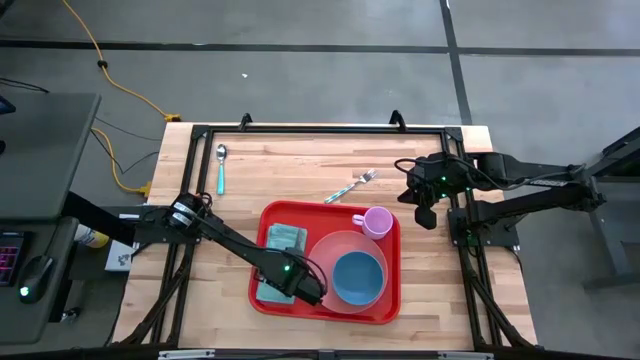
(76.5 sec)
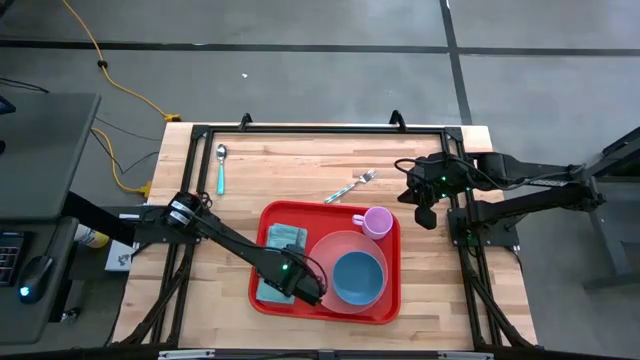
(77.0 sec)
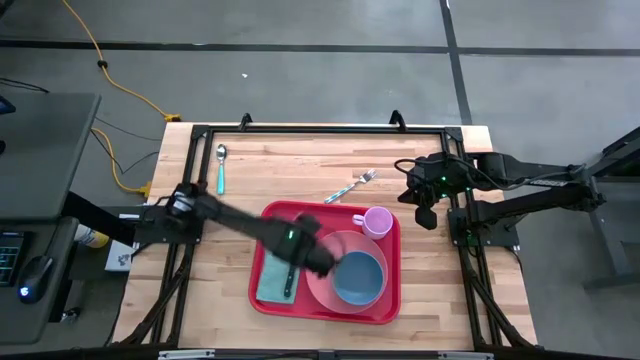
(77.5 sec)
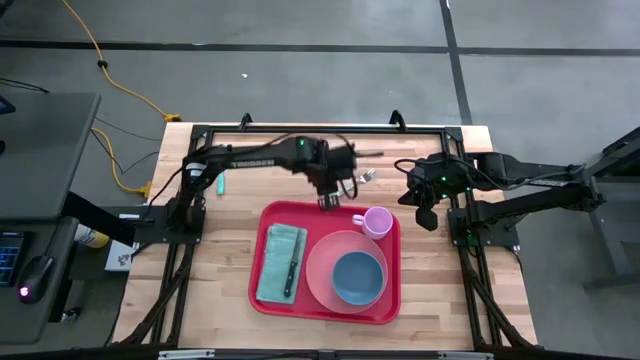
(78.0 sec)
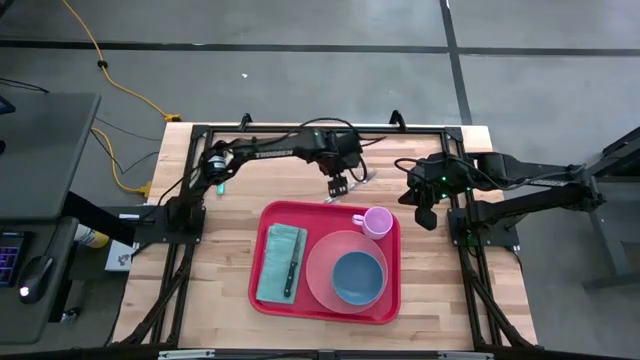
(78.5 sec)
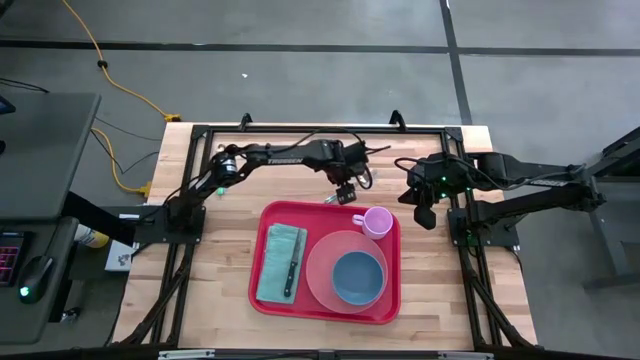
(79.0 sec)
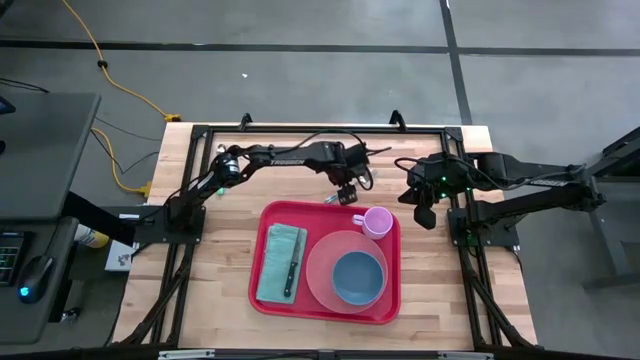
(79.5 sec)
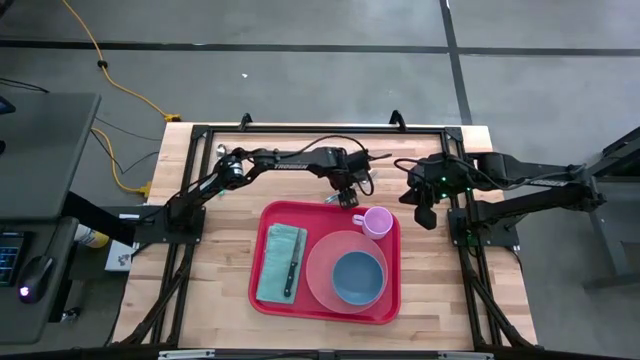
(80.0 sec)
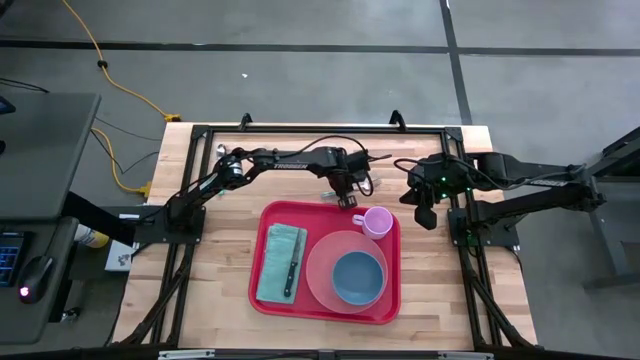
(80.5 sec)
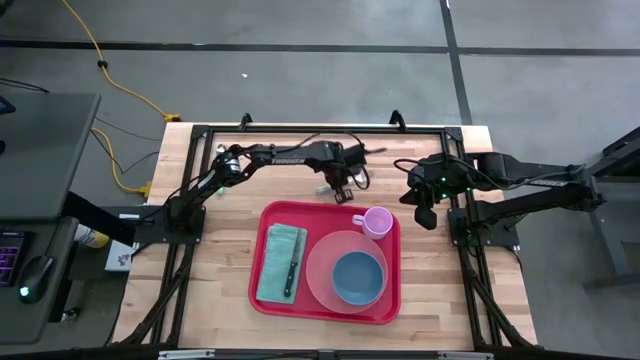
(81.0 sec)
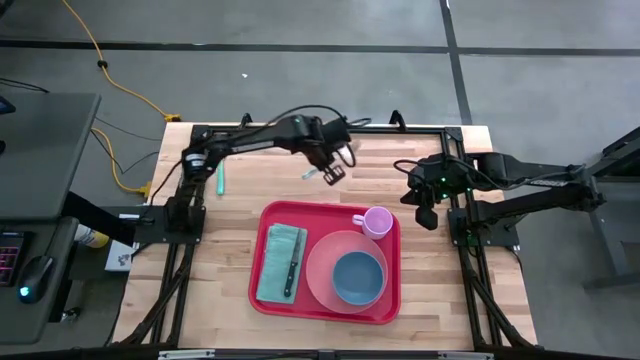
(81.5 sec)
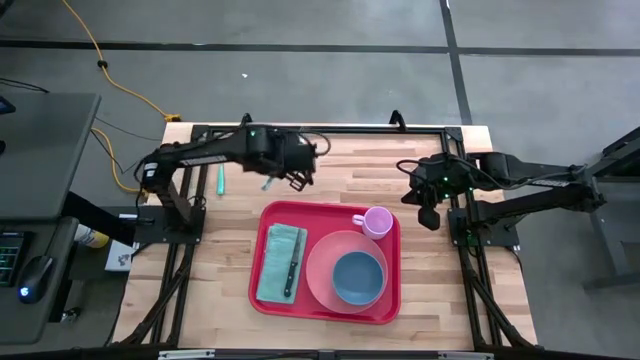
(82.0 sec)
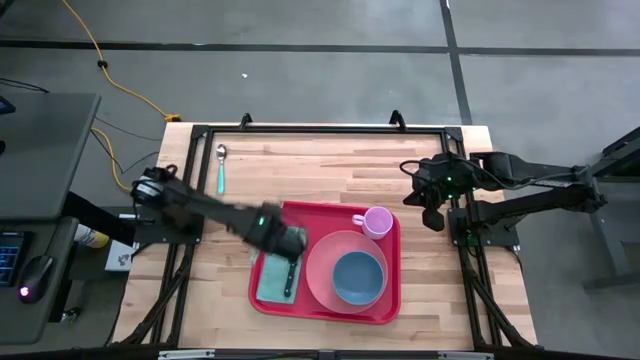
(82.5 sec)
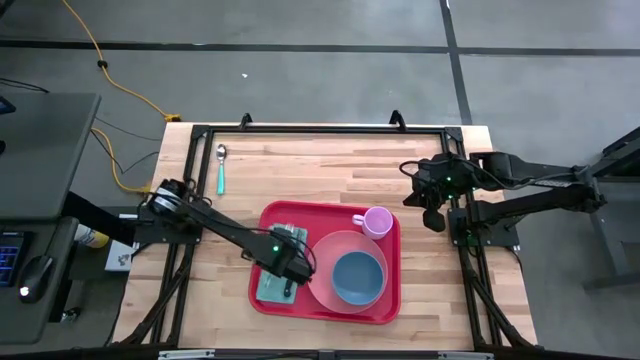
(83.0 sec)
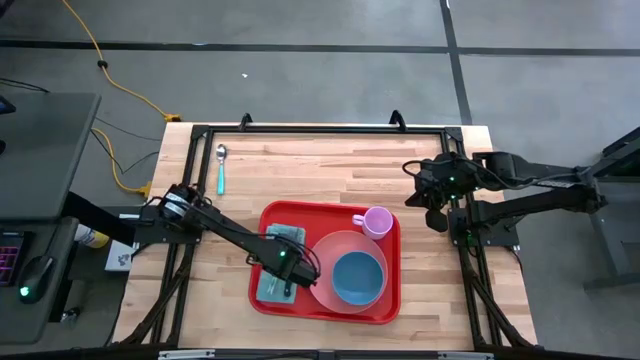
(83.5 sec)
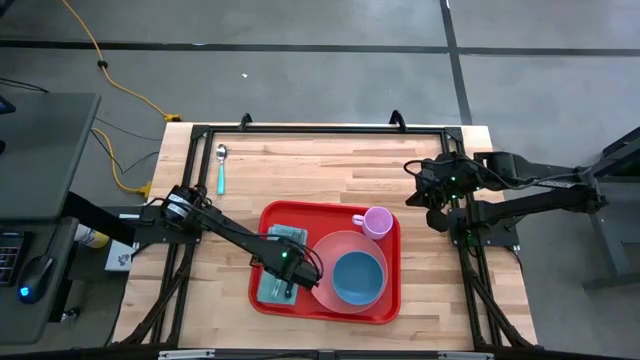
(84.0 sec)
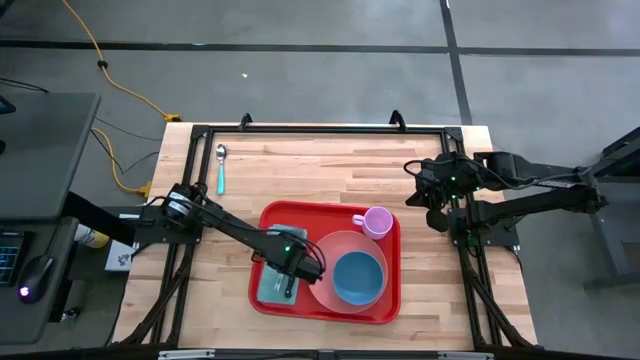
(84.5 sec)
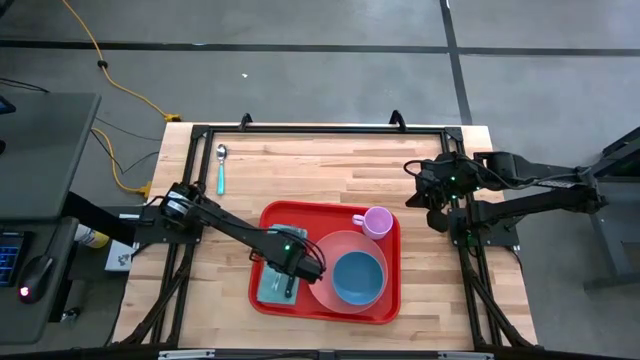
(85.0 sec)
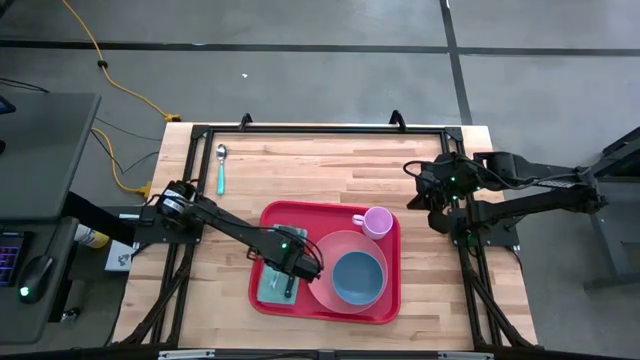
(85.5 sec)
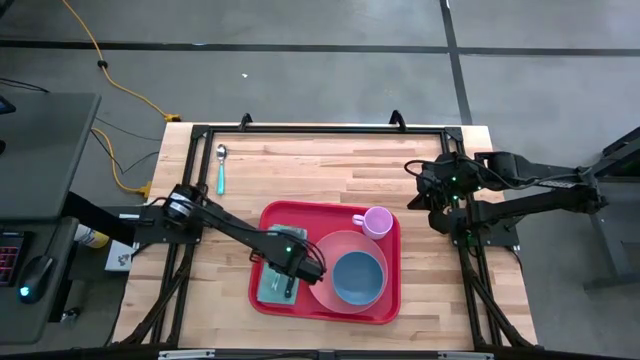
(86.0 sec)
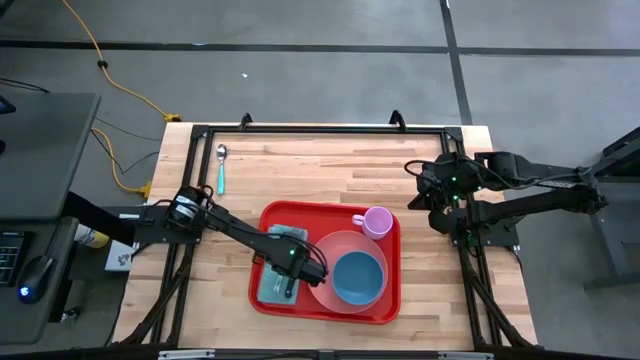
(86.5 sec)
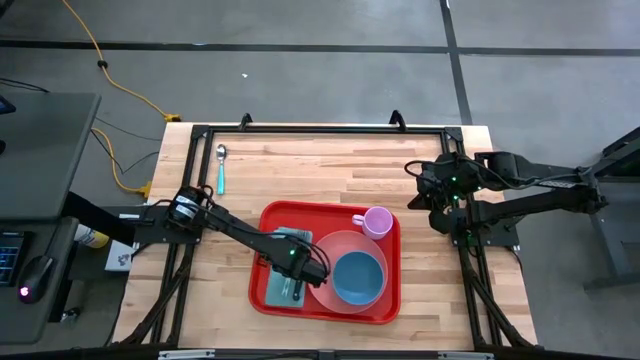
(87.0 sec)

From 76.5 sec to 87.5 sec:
Task: Set up tray
Put the green patterned fork beside the black knife on top of the blue napkin on the red tray

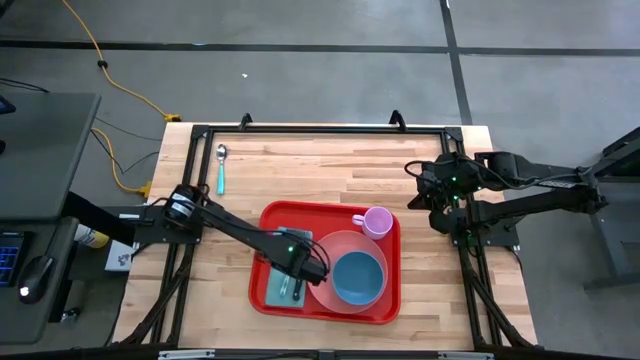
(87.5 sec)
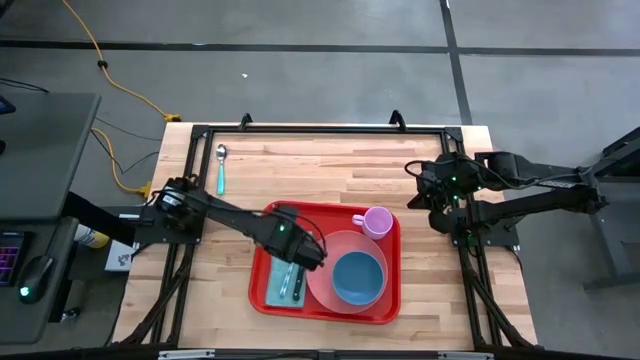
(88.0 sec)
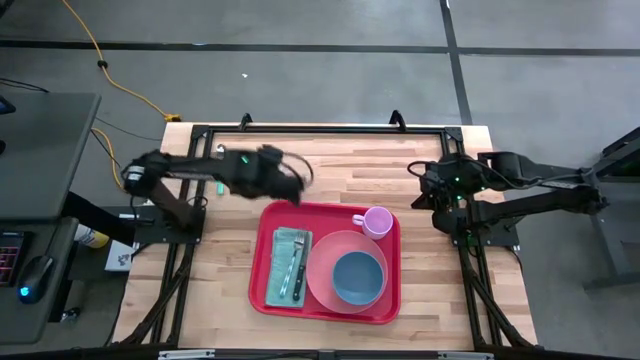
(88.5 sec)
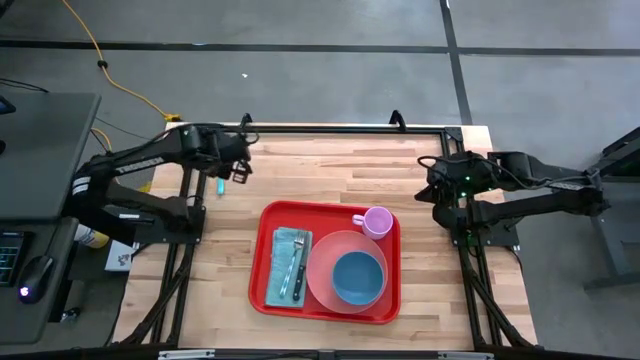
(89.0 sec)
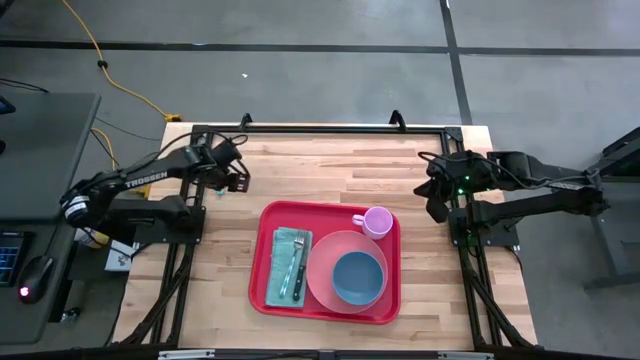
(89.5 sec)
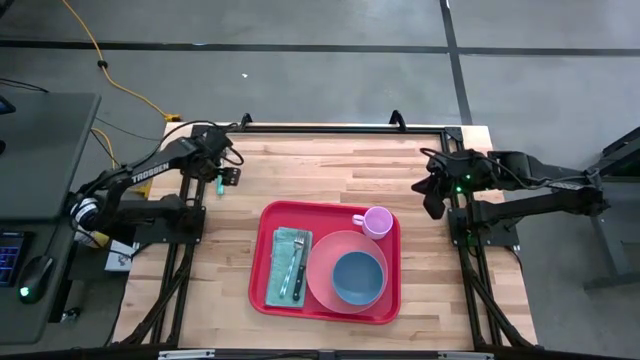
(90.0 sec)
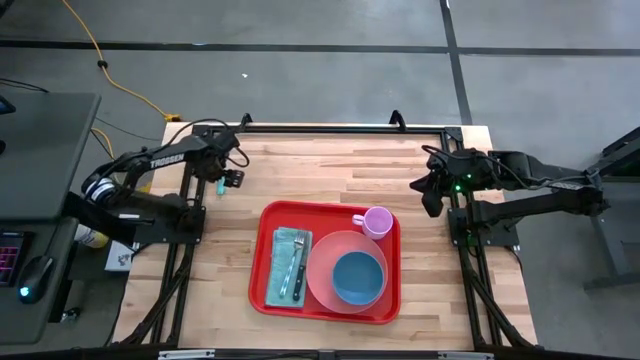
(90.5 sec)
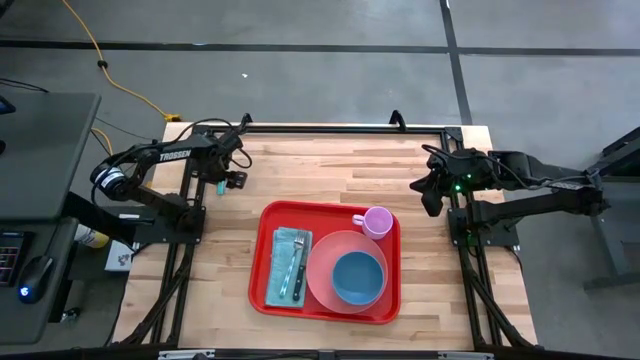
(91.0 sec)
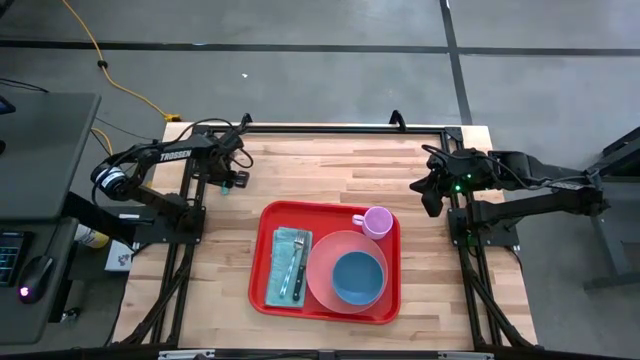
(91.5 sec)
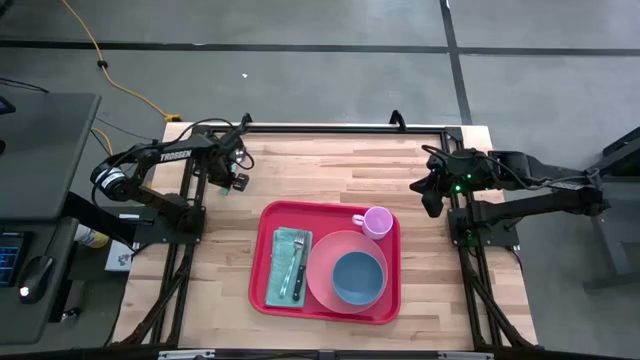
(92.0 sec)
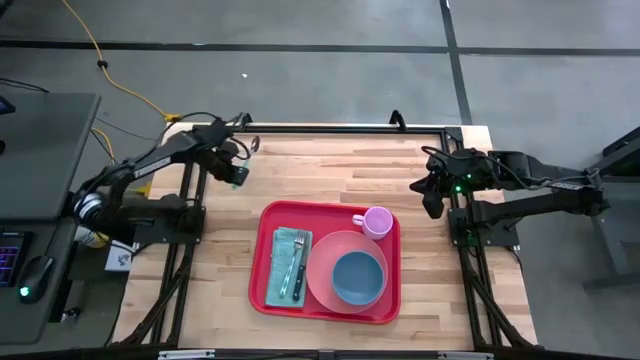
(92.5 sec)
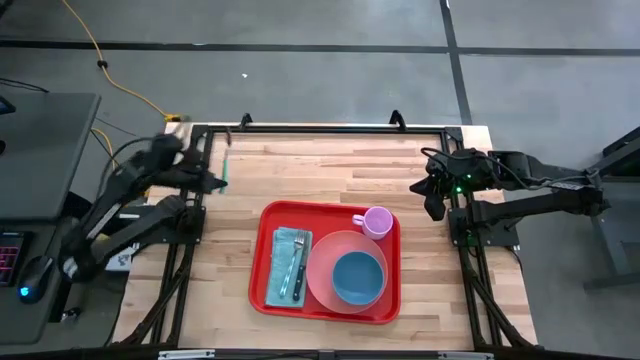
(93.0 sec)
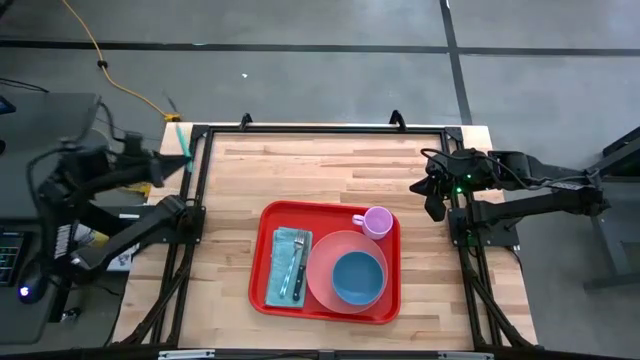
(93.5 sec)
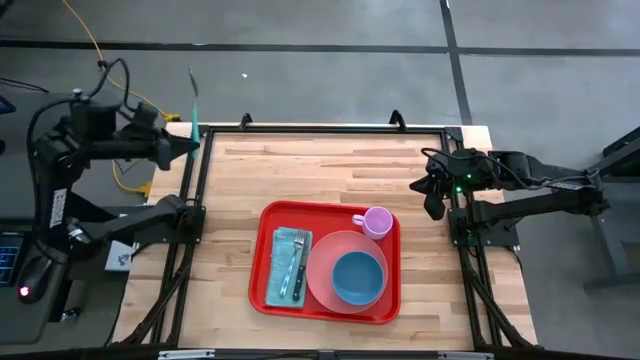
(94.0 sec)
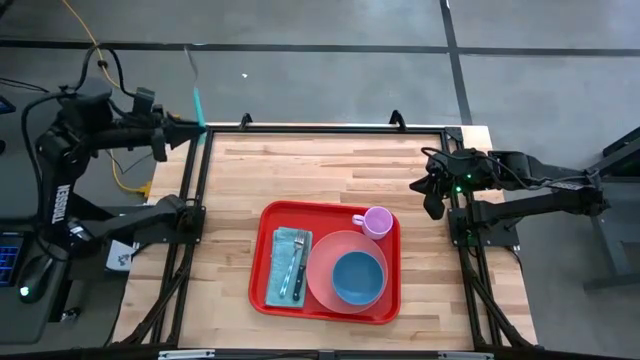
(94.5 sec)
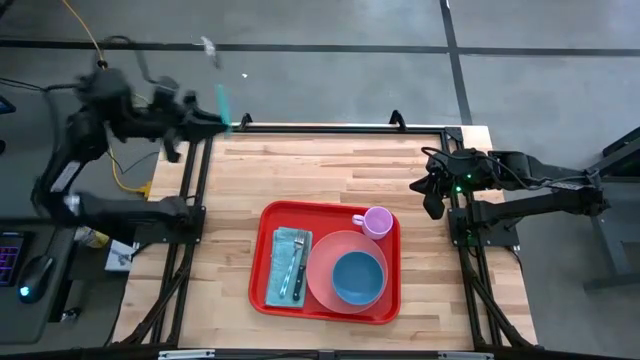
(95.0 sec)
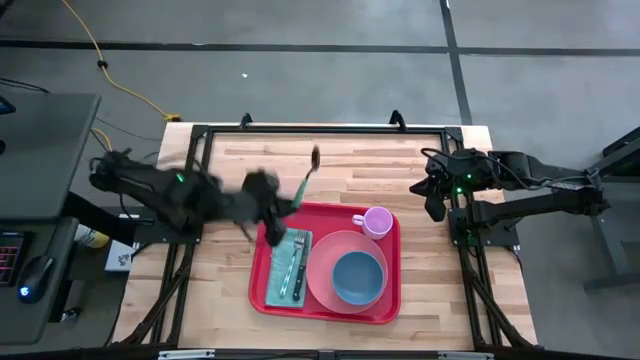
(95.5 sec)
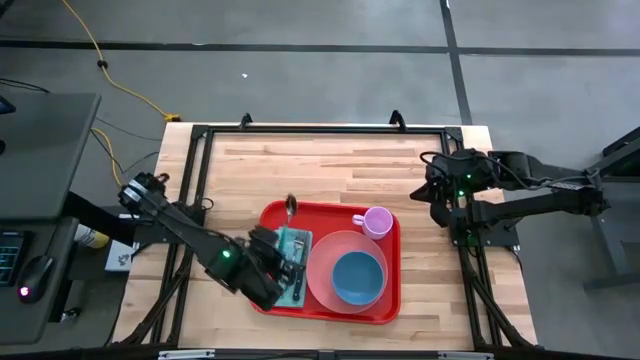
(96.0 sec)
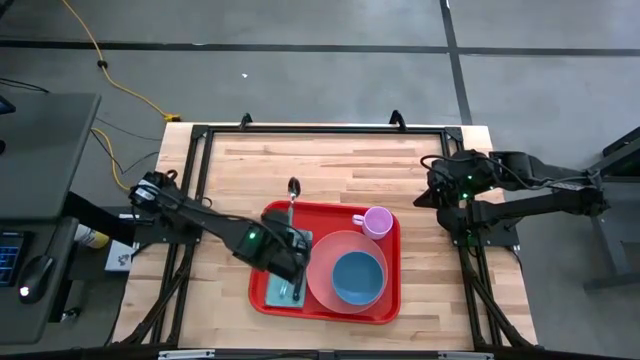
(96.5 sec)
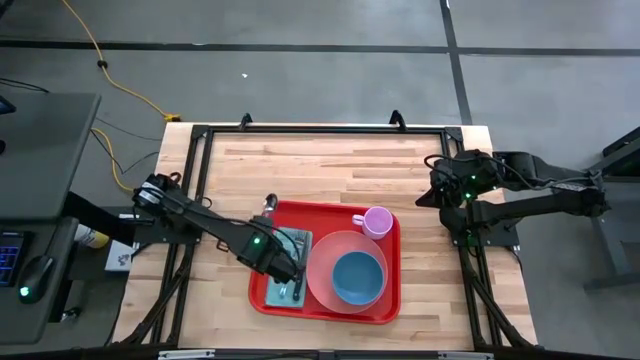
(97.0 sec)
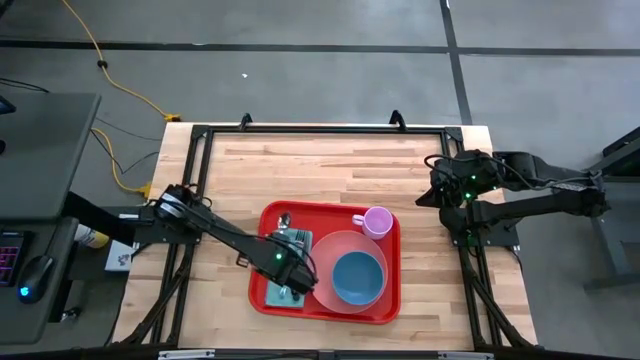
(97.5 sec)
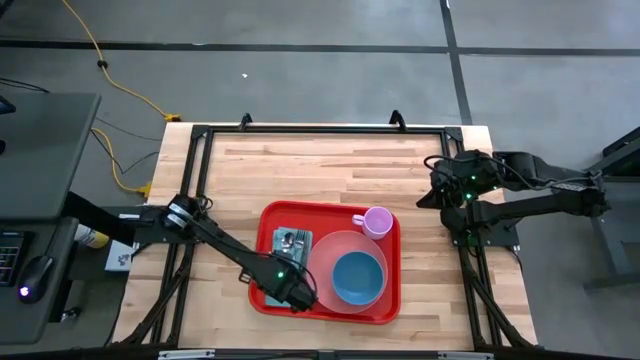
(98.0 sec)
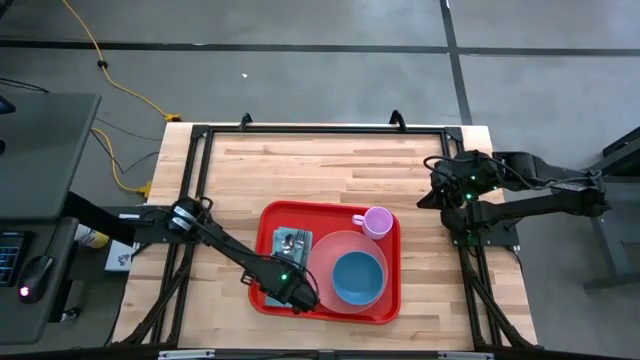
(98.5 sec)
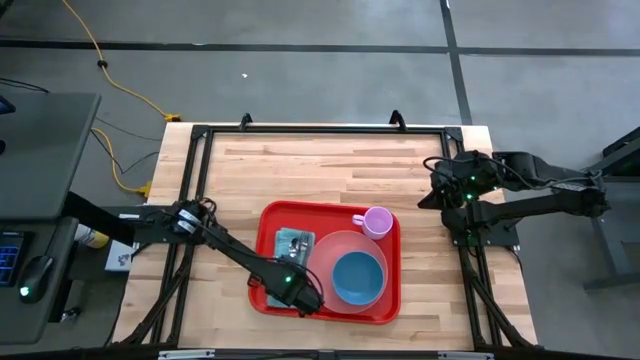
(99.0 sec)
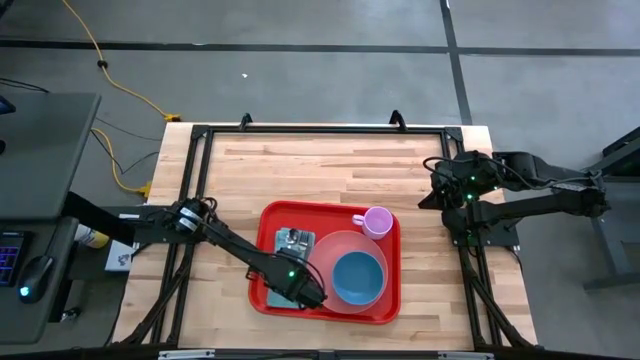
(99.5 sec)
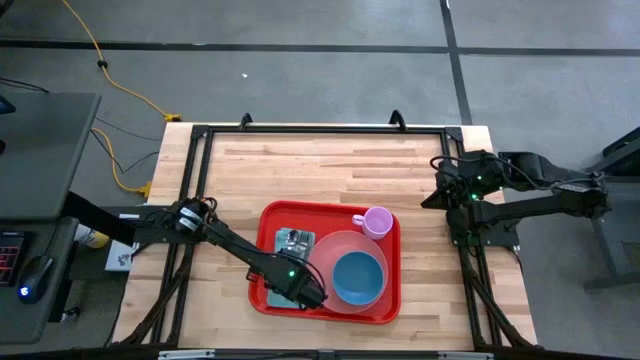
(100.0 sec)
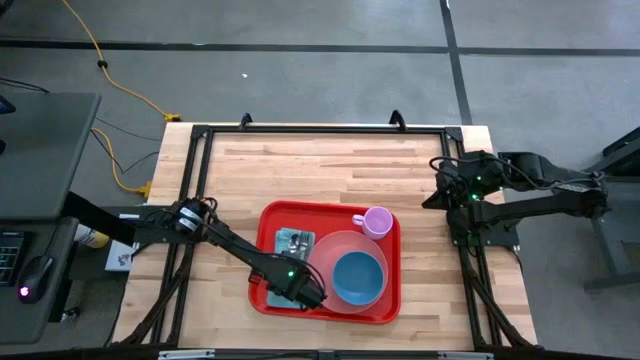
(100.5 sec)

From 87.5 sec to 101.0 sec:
Put the green spoon beside the green patterned fork on top of the blue napkin on the red tray
